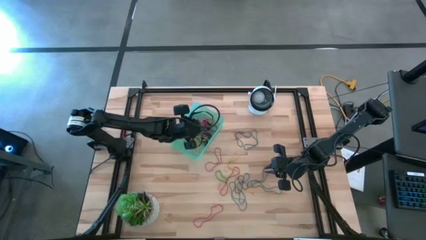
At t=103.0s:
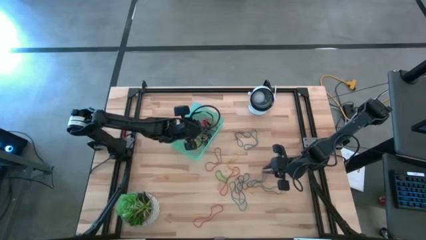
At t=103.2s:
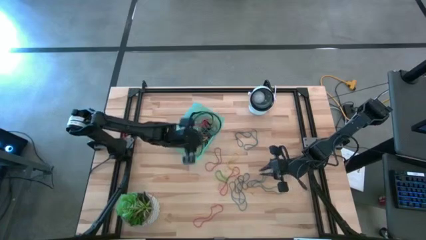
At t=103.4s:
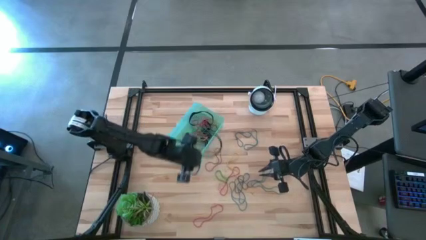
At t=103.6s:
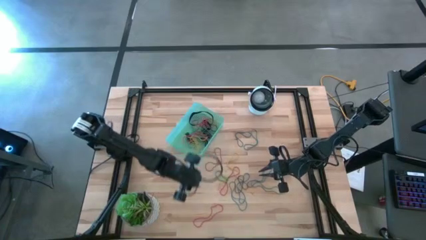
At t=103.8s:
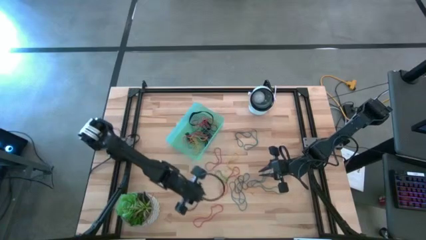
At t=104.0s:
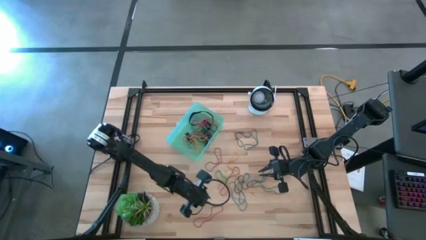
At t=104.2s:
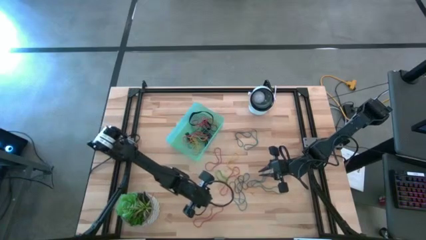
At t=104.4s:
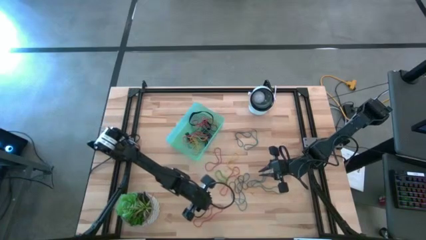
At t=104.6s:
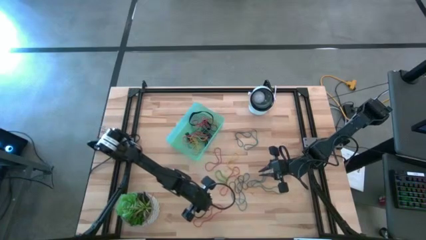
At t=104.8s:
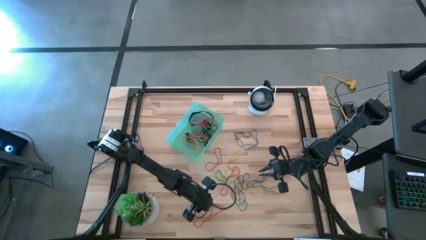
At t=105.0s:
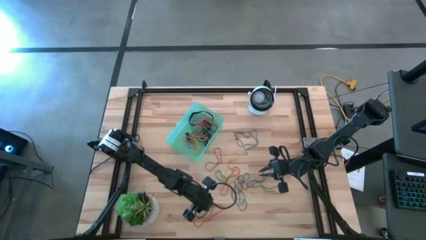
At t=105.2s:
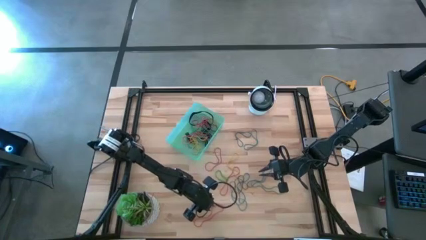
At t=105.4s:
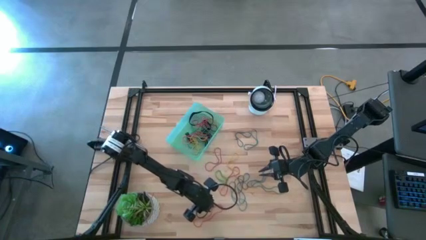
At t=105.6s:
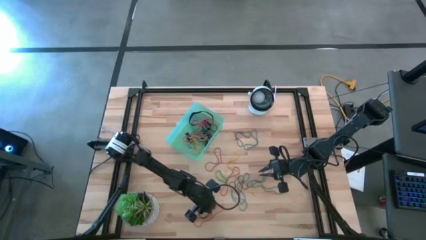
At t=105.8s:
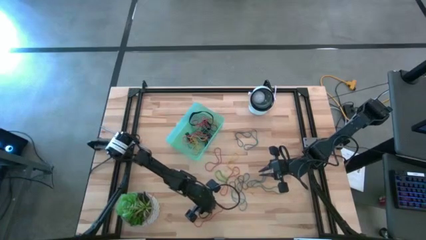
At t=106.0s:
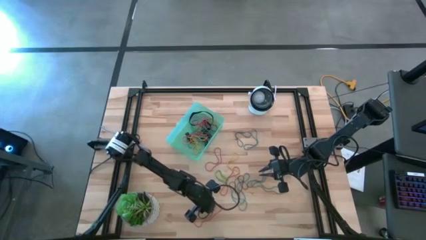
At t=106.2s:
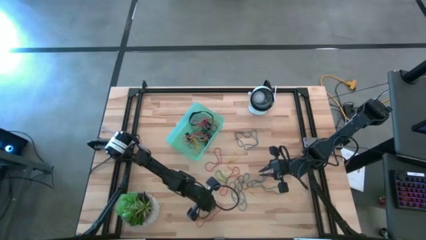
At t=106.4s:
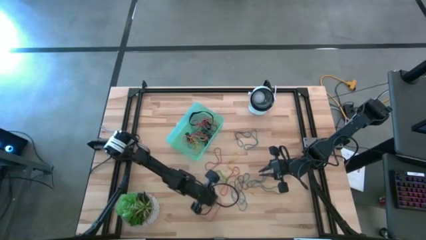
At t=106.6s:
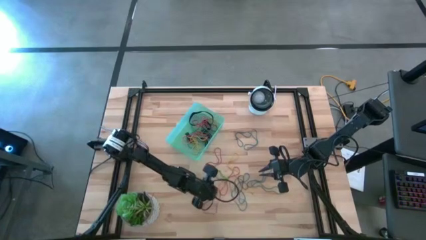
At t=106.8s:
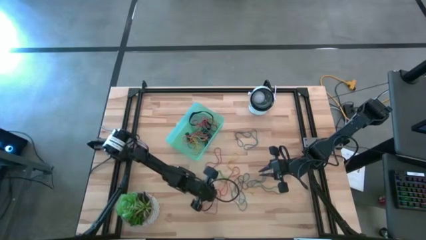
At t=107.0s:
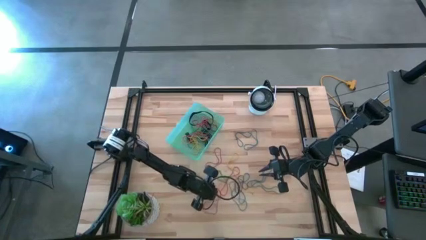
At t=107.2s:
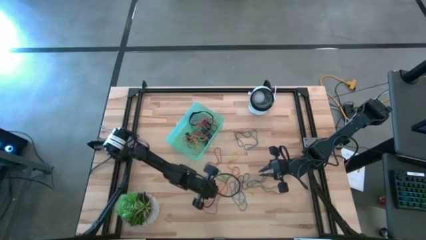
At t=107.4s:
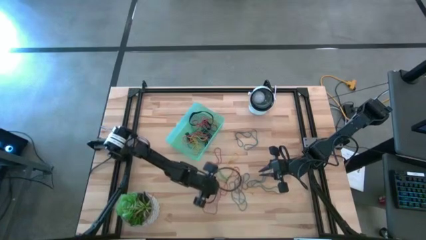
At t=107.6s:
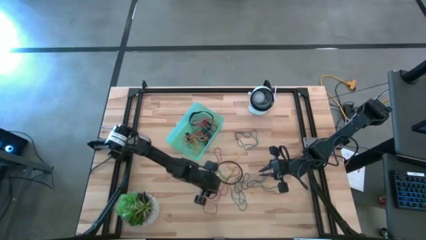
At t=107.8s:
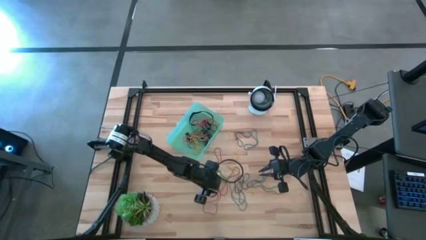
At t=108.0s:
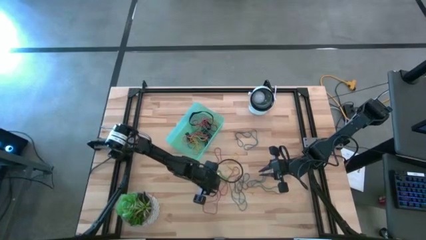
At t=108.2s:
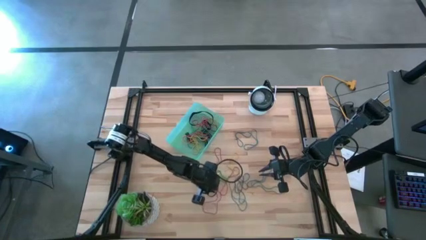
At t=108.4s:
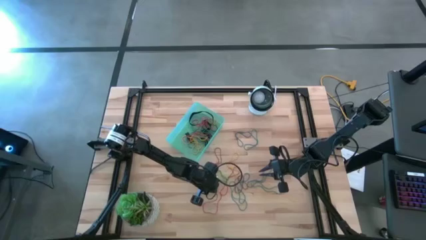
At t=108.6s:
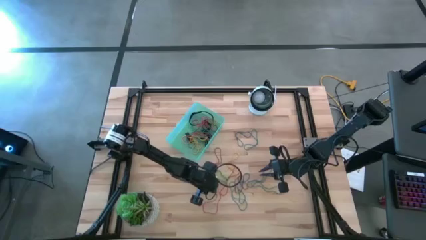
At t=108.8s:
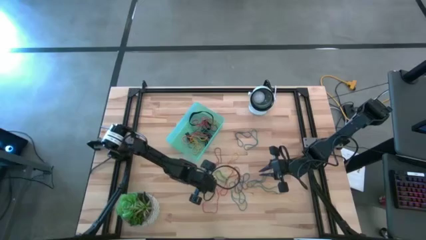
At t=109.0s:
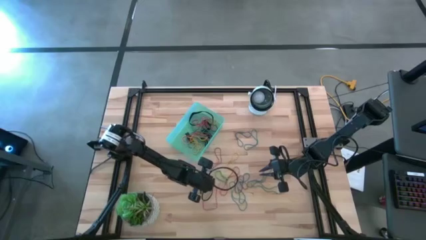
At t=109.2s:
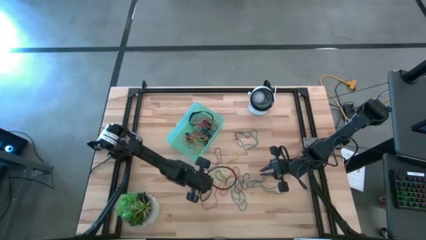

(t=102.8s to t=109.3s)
Task: Pick and place rubber bands into bin
Put the red rubber band into the green bin

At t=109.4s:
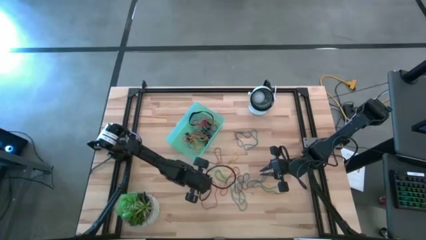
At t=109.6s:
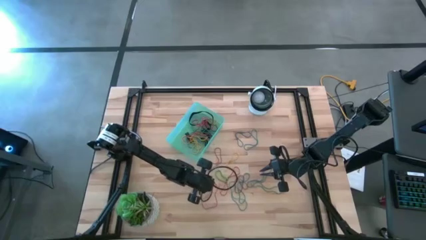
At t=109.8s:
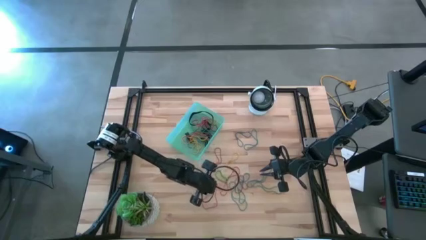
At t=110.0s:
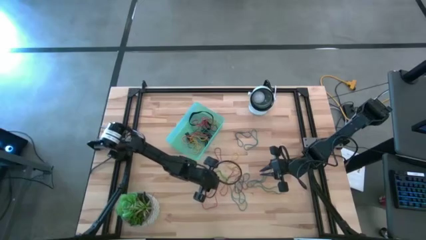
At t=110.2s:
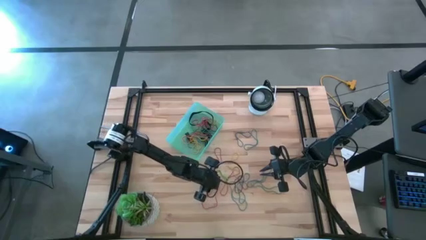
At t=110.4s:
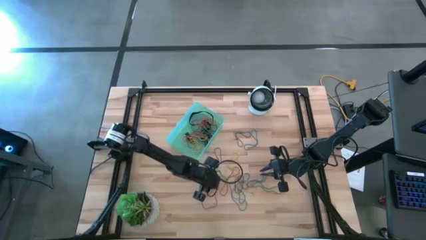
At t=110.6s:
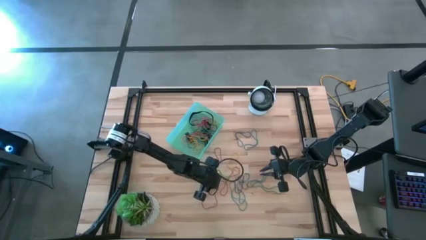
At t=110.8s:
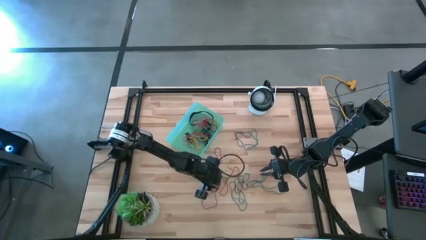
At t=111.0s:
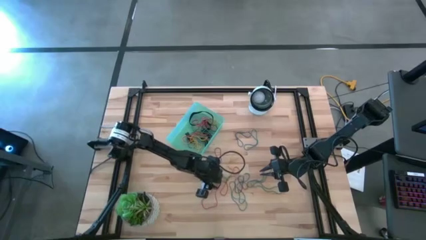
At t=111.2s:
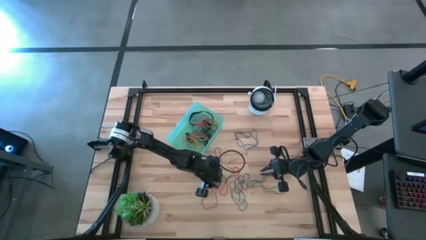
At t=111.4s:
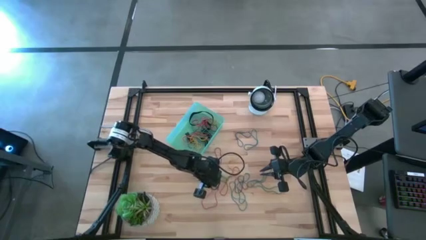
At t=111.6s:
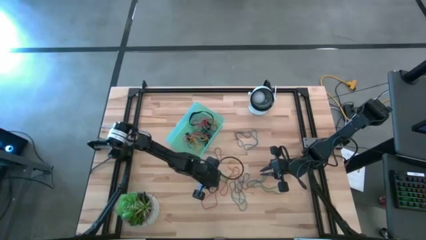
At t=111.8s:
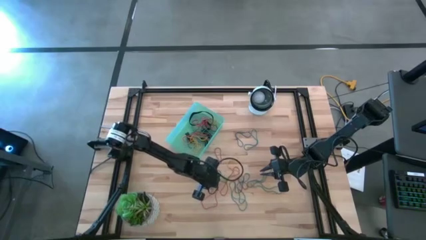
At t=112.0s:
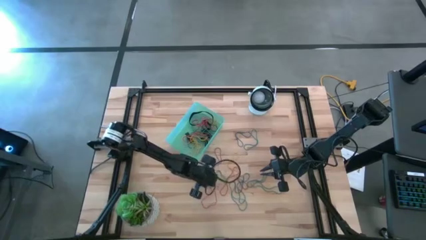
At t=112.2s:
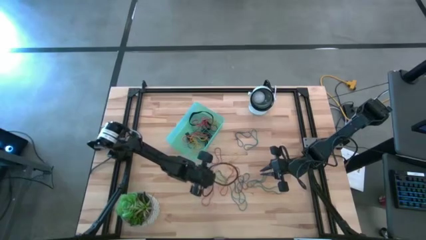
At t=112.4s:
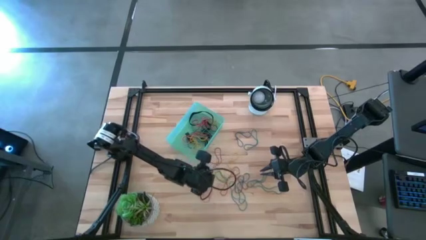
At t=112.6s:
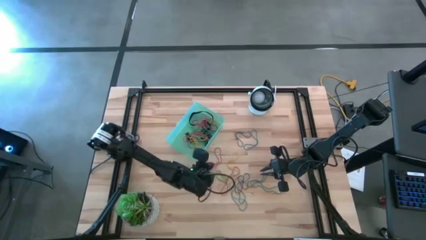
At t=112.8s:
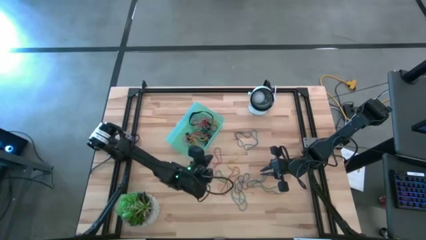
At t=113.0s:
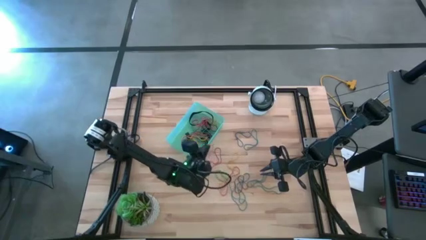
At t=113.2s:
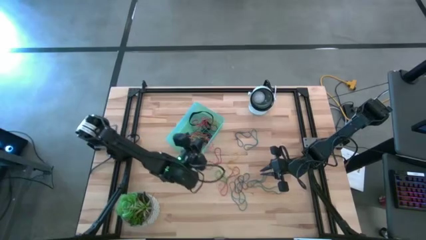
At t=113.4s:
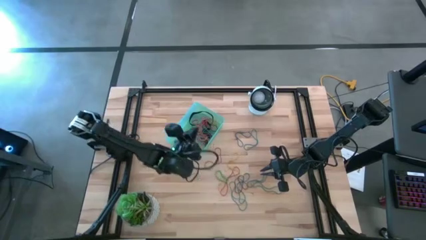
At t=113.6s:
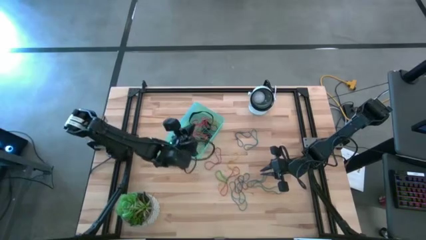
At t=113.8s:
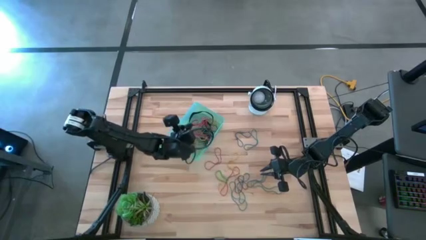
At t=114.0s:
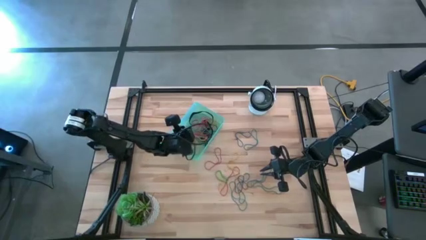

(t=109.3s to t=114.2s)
Put the red rubber band into the green bin

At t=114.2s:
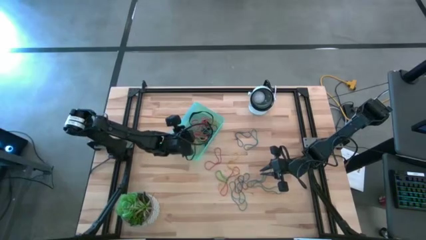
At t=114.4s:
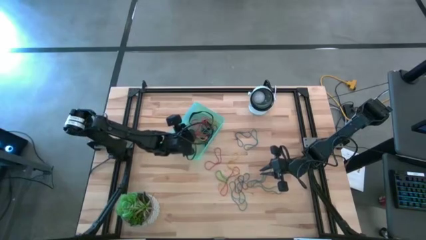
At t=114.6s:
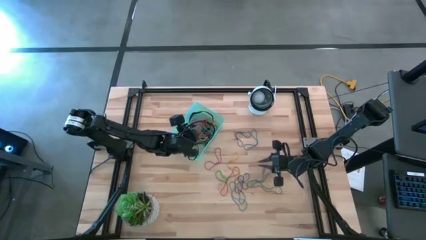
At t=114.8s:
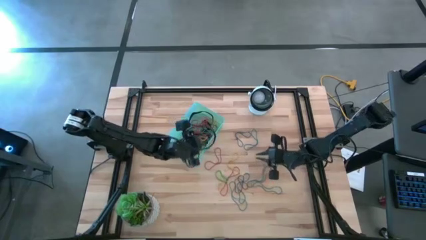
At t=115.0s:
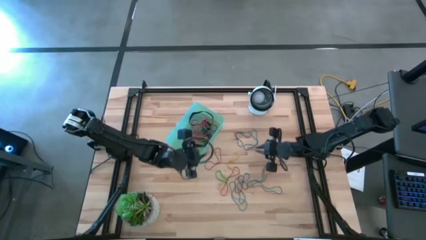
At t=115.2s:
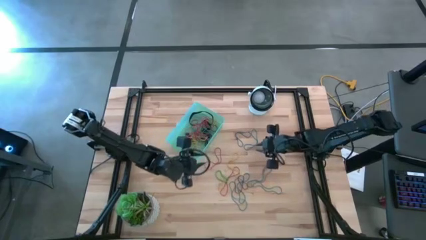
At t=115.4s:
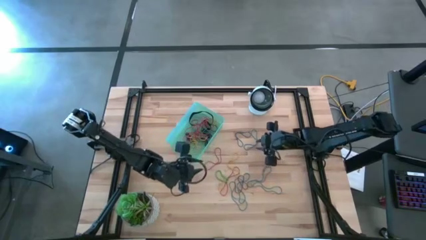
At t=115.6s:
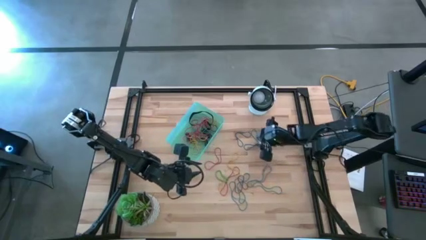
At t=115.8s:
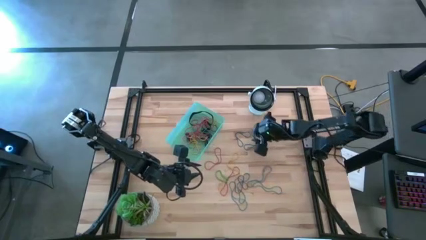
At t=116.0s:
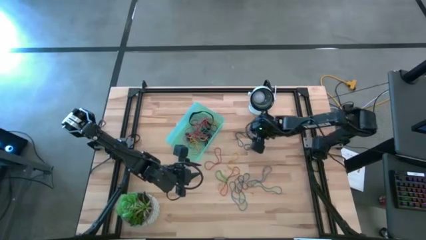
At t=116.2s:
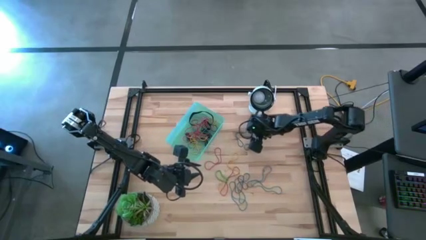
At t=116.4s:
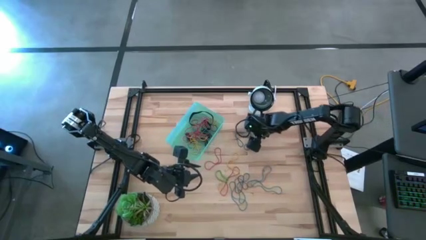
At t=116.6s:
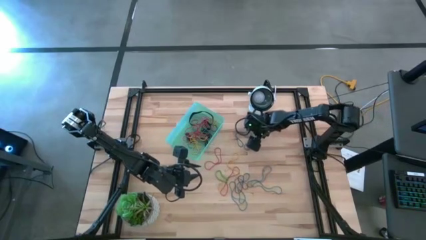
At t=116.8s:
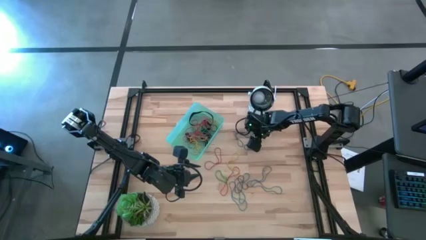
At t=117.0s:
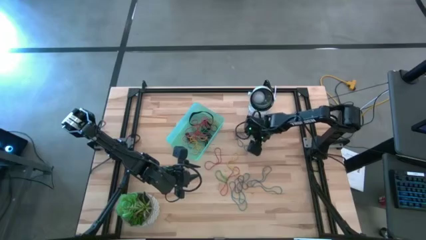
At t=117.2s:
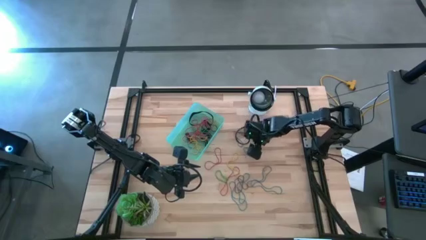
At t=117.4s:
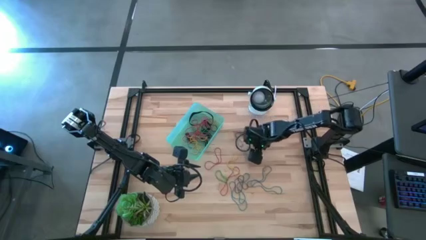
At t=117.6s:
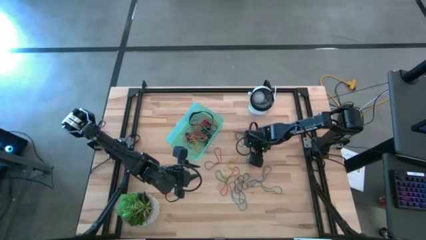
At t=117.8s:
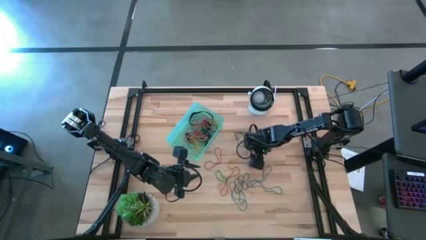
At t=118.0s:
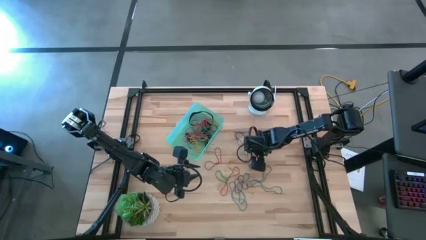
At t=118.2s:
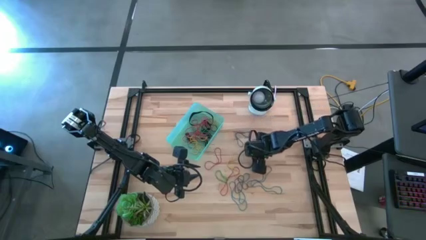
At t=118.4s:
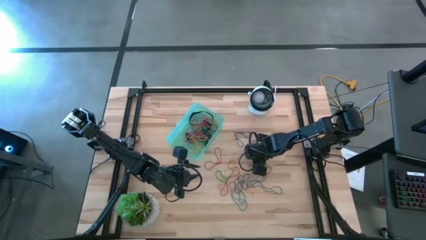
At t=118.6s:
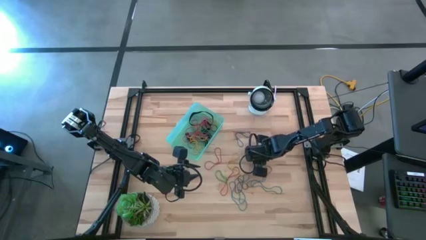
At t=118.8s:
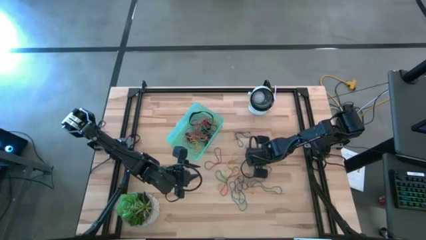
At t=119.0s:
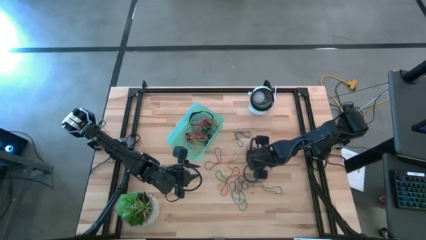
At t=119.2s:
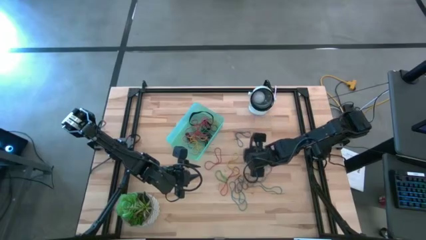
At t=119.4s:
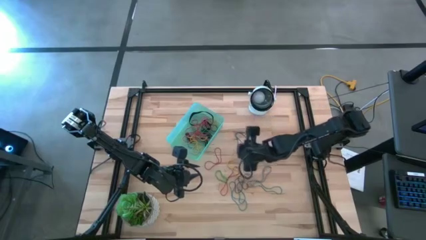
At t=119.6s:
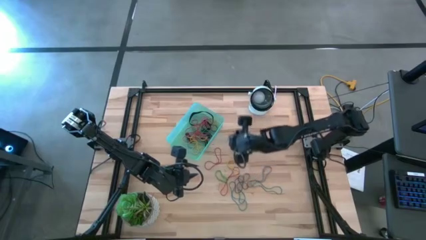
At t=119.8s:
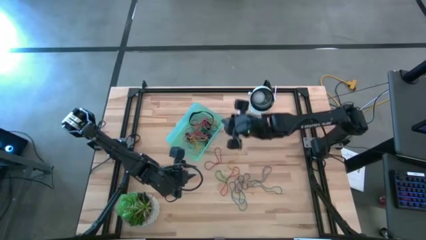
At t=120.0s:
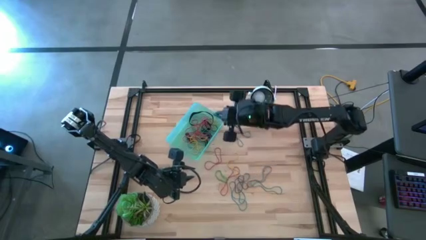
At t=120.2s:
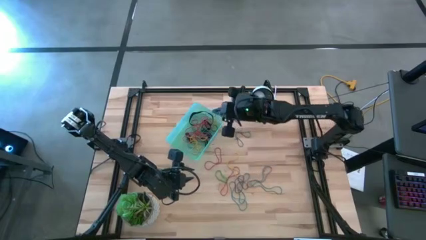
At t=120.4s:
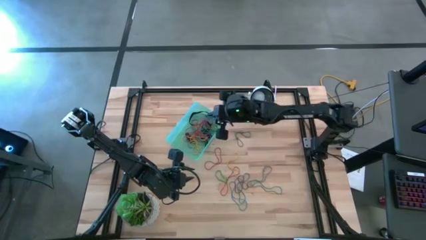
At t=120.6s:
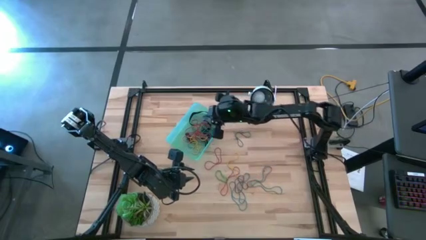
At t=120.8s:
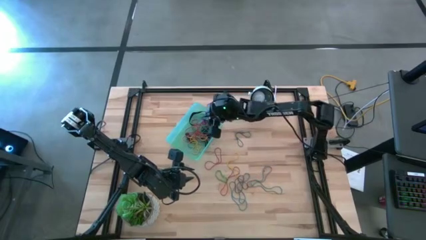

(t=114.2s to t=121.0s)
Put the blue rubber band into the green bin
